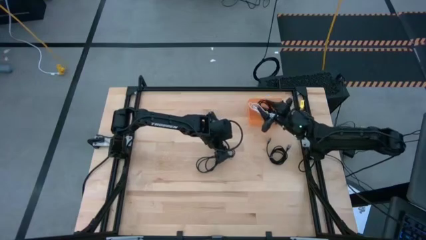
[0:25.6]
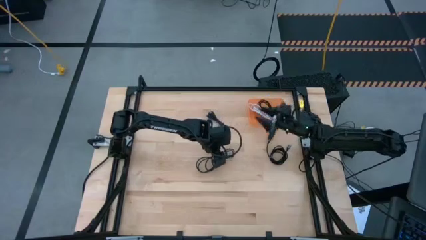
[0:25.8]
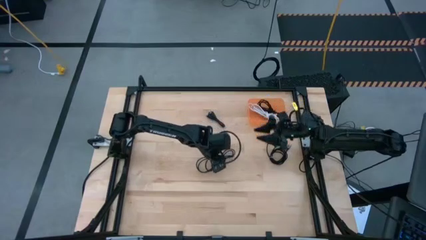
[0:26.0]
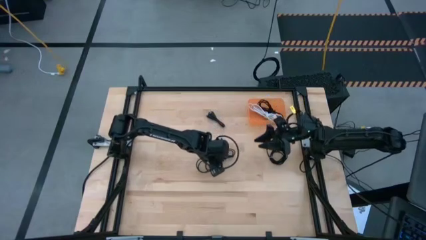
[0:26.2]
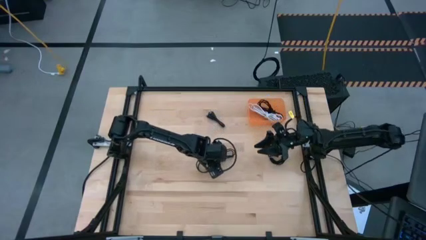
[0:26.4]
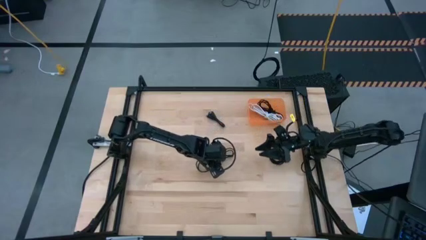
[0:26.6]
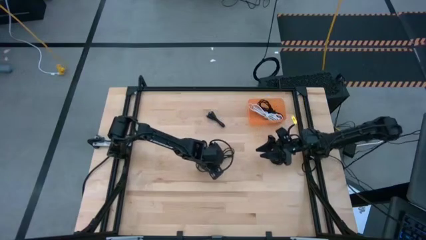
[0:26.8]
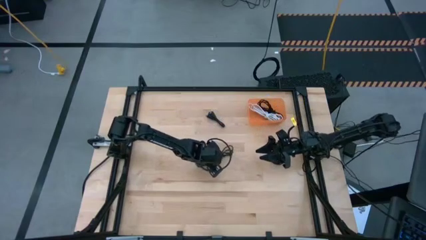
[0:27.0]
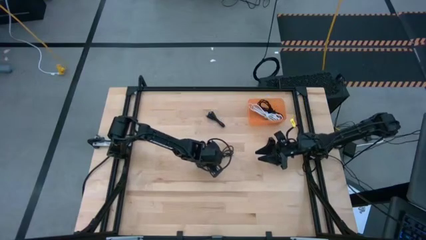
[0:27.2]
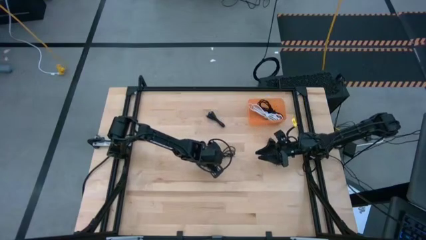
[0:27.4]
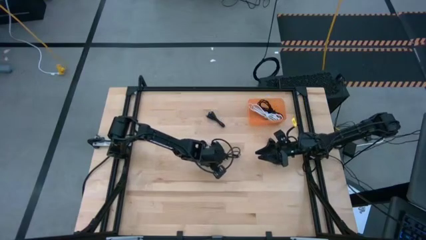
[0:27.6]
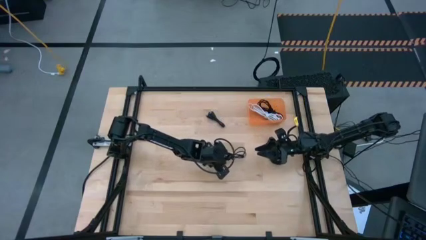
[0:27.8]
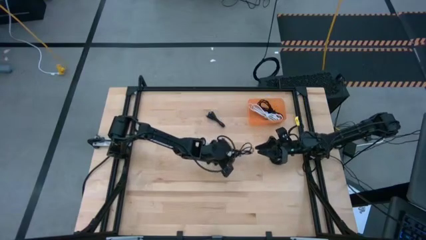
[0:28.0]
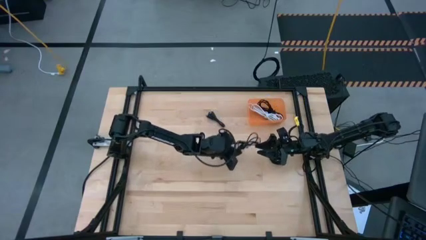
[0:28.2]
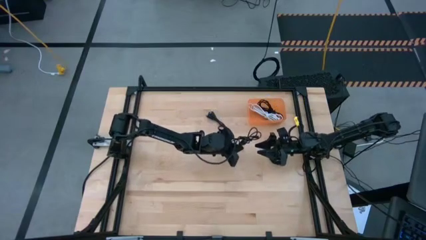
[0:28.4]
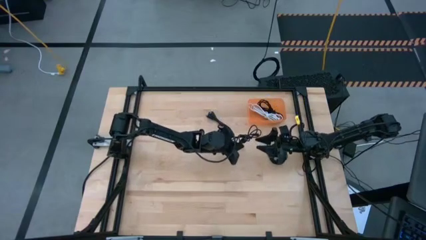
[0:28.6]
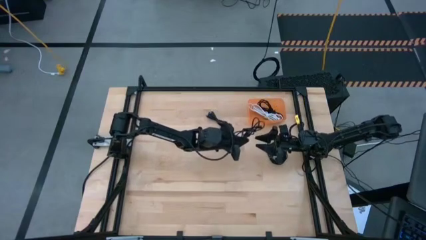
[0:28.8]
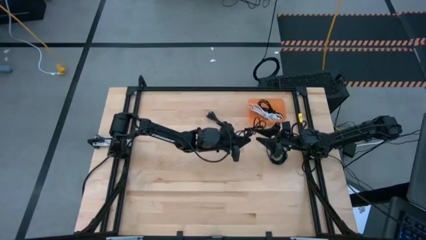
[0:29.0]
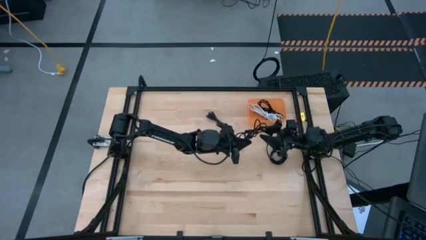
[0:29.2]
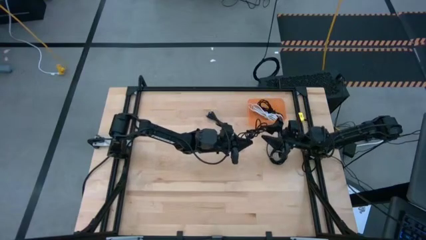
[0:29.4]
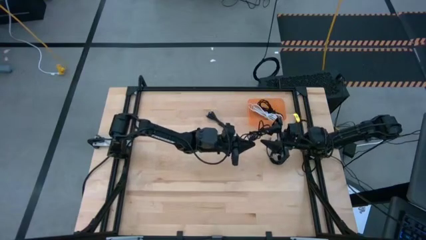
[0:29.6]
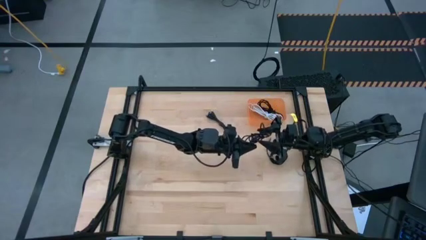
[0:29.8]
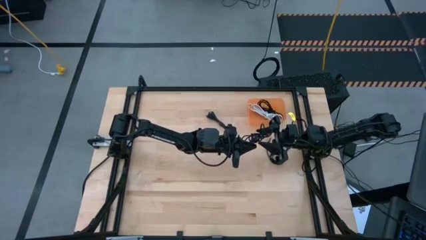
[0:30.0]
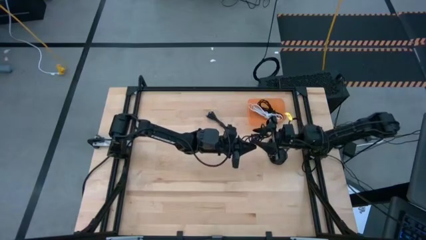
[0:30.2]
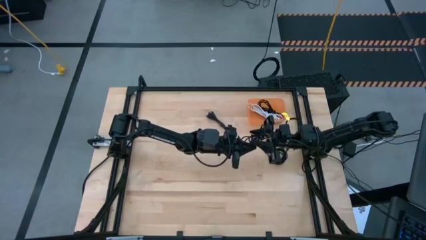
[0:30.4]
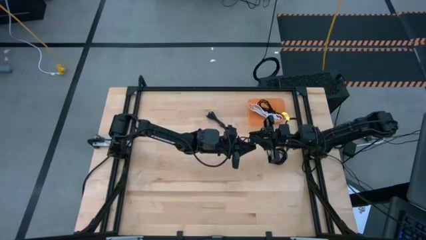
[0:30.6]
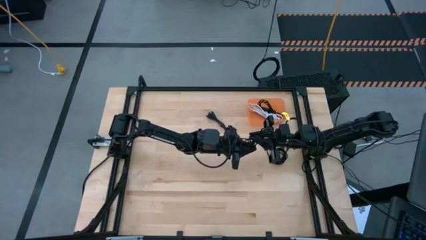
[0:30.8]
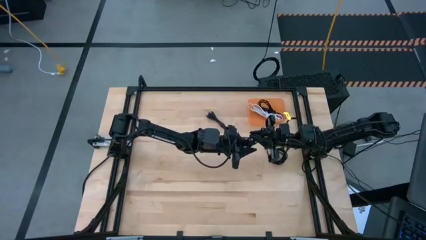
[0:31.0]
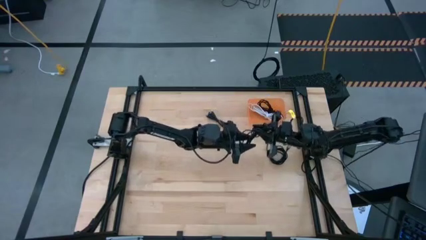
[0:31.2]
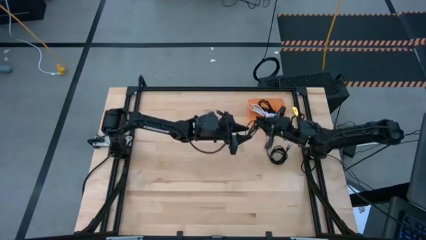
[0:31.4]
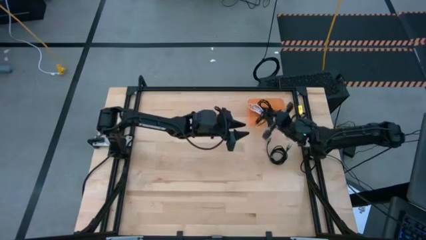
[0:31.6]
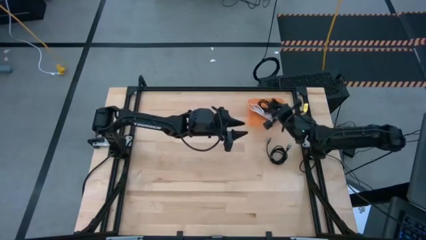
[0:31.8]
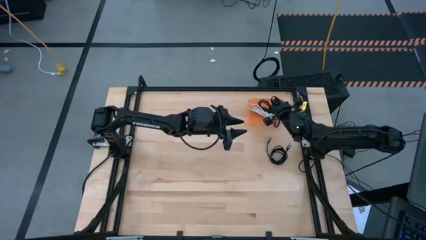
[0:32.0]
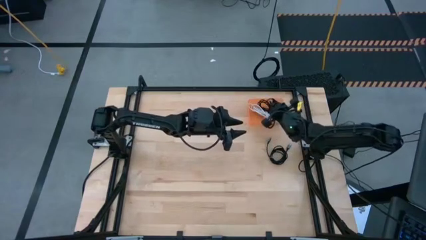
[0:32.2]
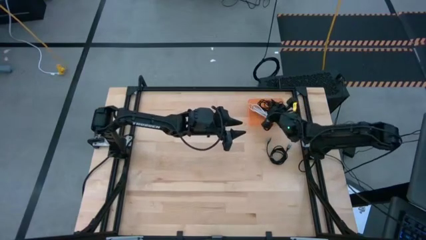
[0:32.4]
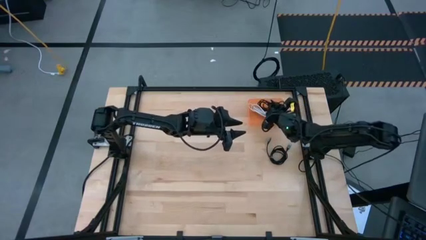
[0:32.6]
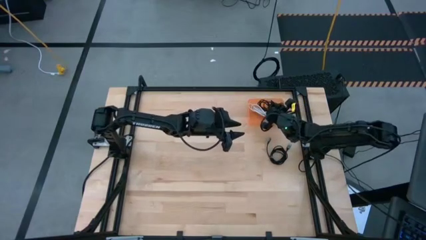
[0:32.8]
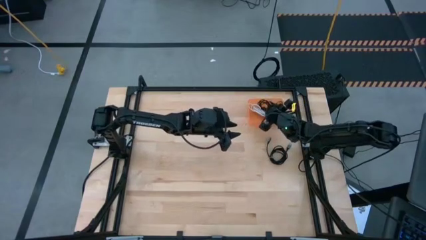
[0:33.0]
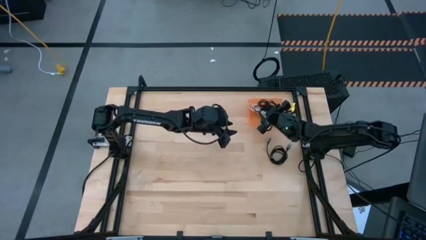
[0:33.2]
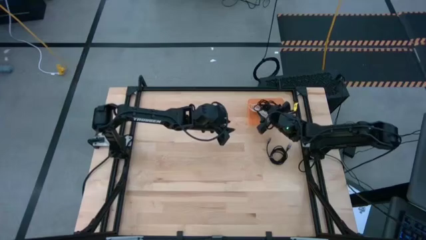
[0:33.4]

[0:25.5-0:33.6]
Task: Pick and place USB-C Cables
Put the bottom left black charger cable into the orange bin

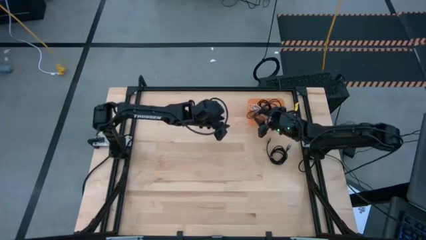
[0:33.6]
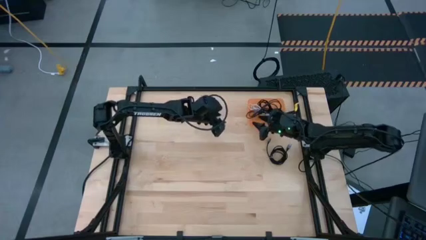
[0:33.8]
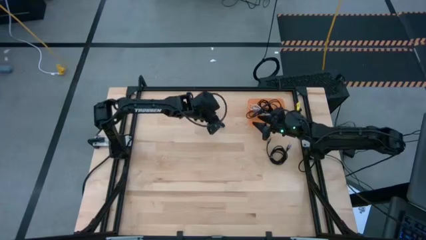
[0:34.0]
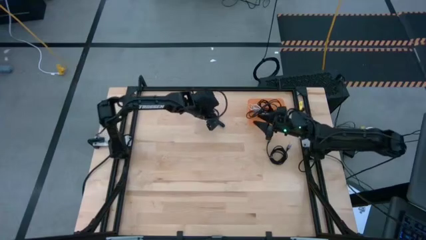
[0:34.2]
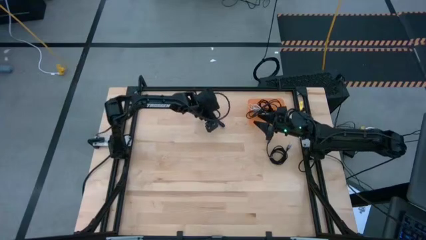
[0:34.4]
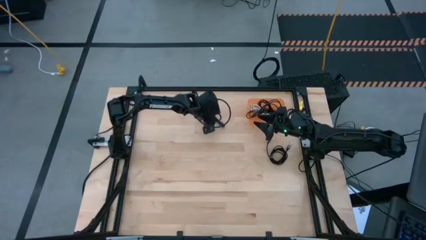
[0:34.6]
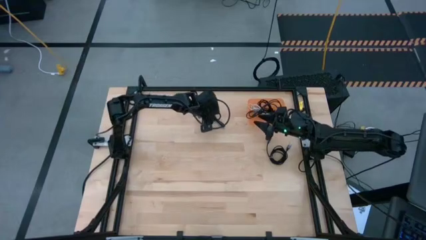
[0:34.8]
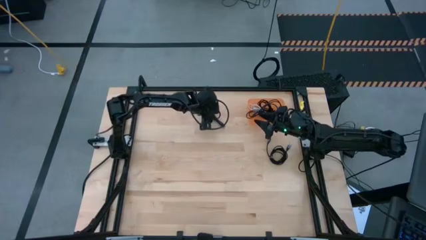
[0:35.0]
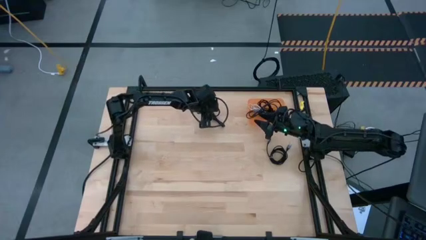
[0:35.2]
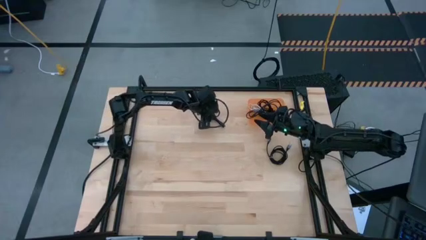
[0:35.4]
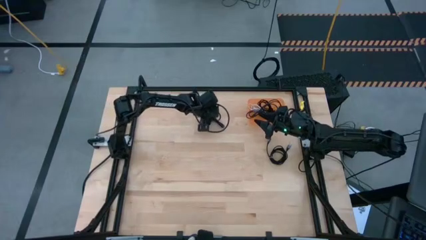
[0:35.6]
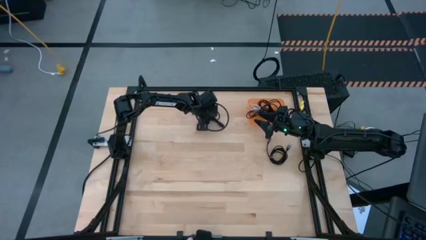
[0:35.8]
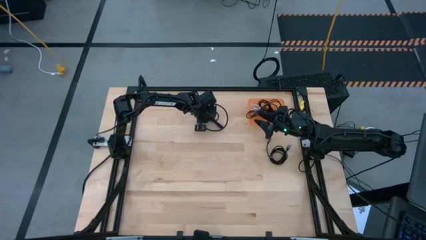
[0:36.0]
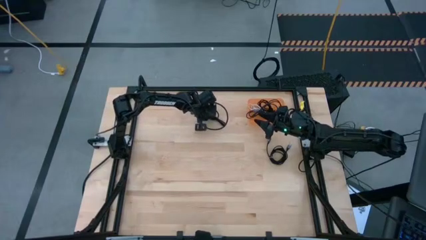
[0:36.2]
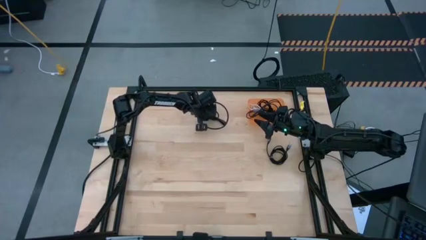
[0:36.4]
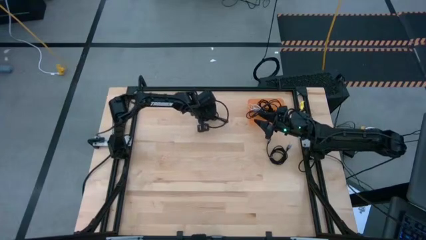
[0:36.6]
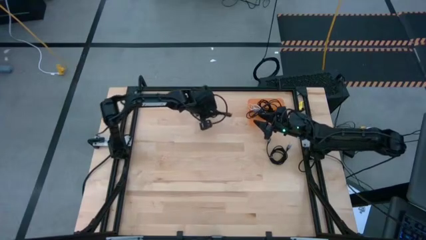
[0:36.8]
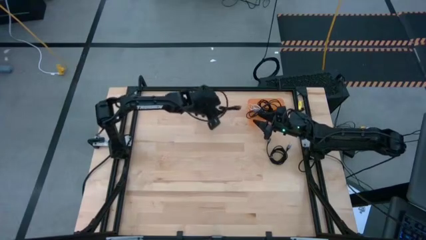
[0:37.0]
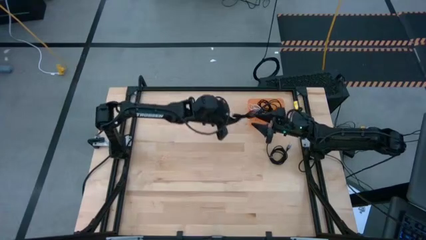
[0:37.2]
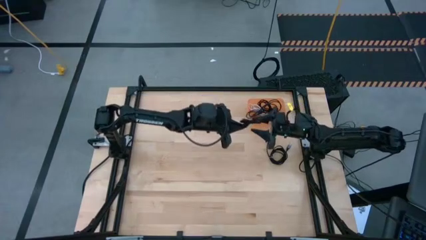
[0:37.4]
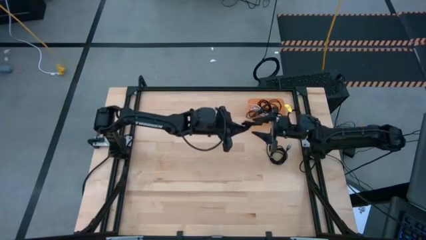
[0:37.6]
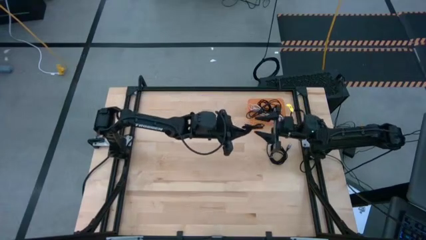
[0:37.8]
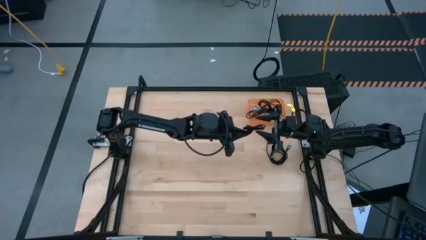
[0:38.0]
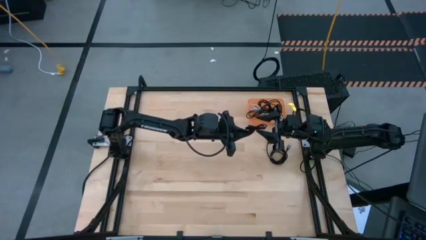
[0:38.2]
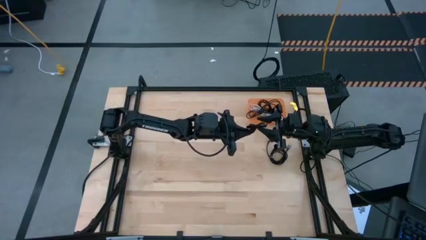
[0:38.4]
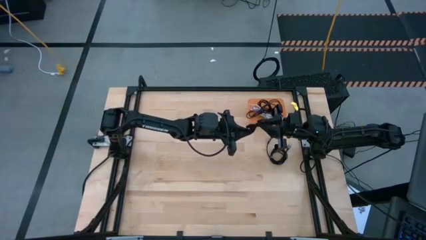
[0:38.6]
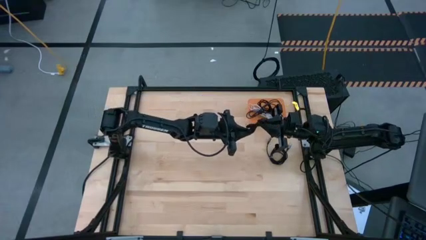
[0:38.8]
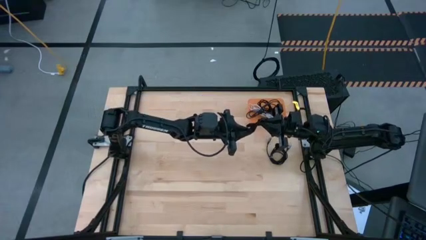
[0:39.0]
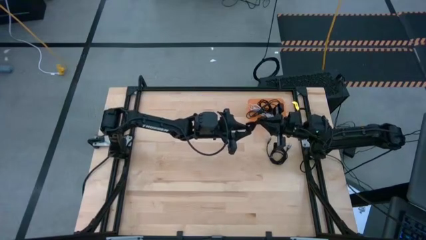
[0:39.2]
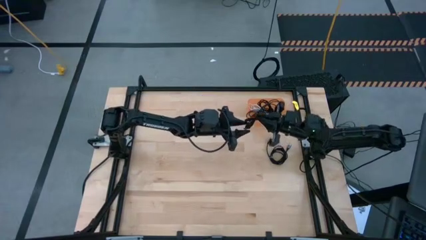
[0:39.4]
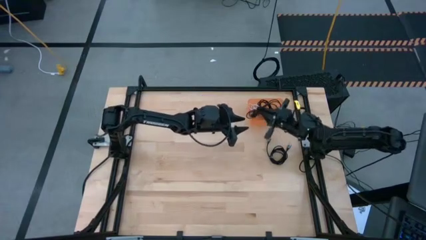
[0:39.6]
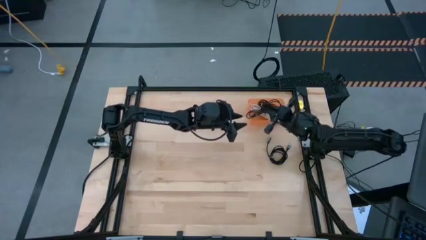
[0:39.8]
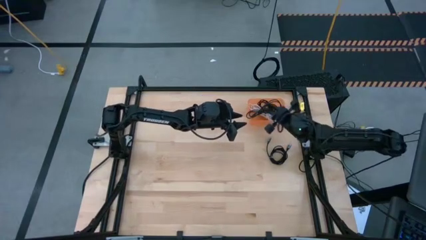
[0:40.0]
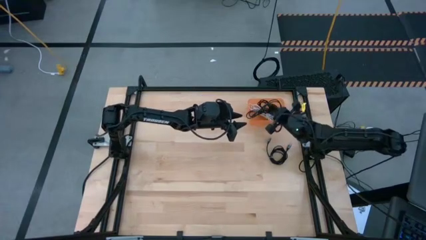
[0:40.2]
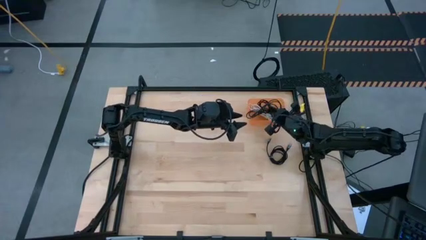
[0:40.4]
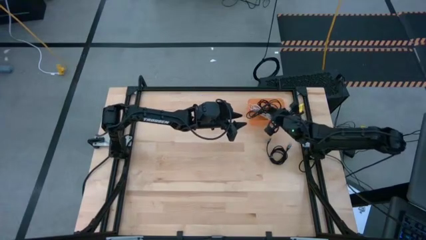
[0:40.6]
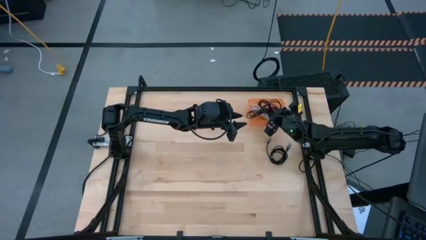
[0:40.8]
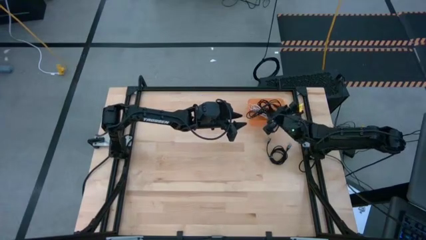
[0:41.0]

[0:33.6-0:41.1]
Put the top black charger cable into the orange bin
